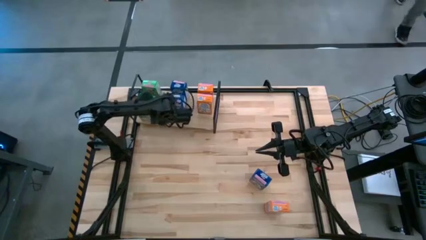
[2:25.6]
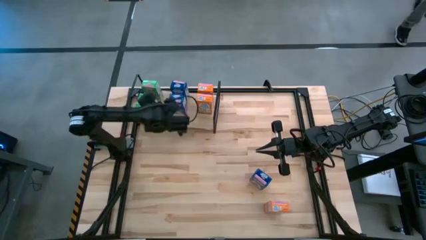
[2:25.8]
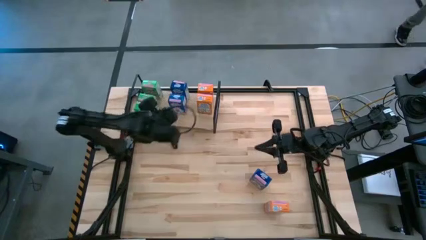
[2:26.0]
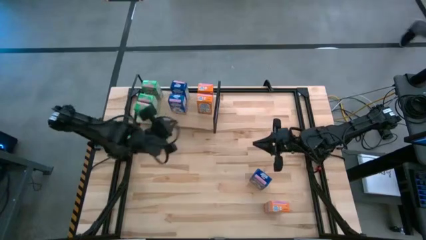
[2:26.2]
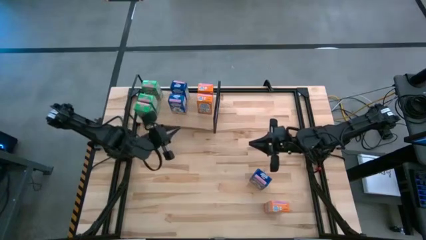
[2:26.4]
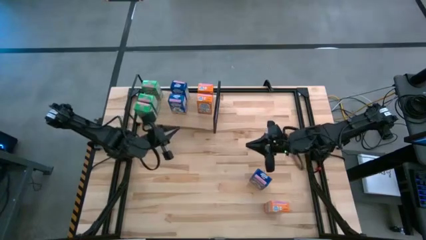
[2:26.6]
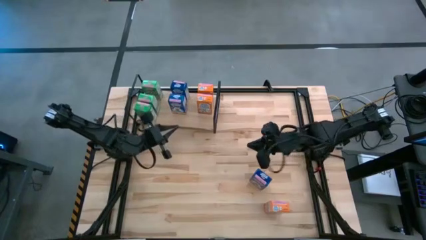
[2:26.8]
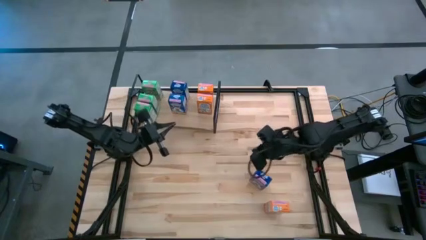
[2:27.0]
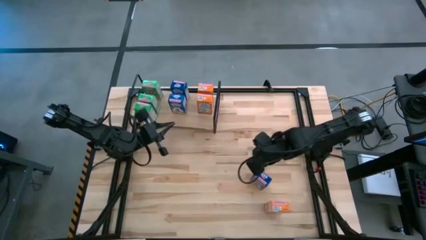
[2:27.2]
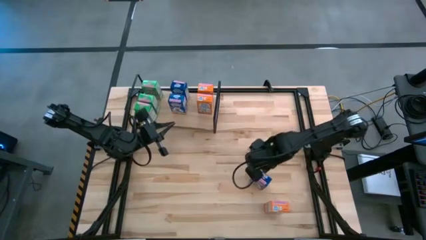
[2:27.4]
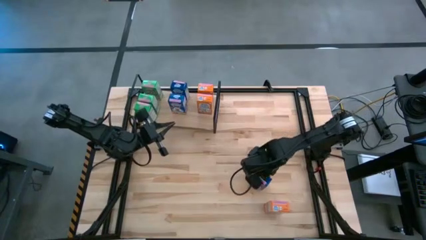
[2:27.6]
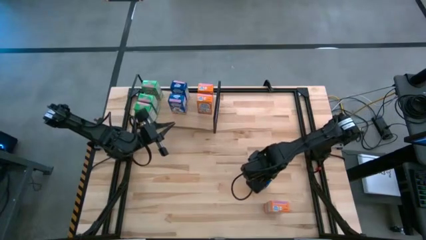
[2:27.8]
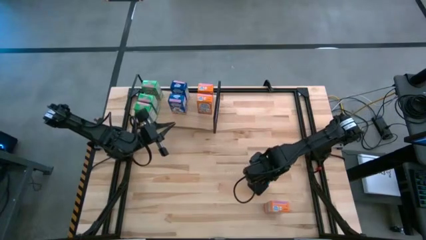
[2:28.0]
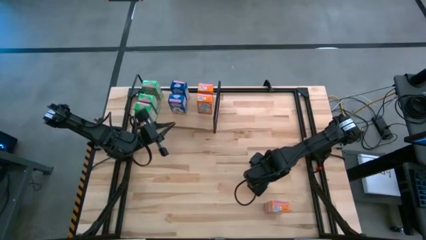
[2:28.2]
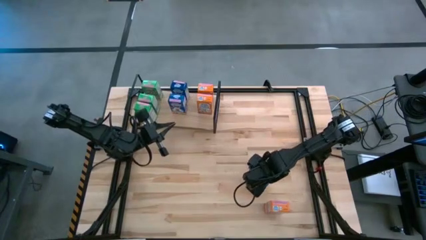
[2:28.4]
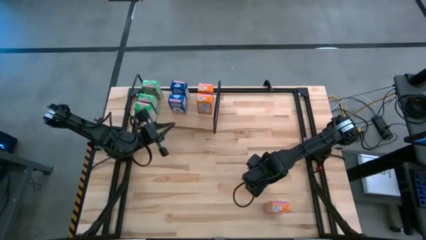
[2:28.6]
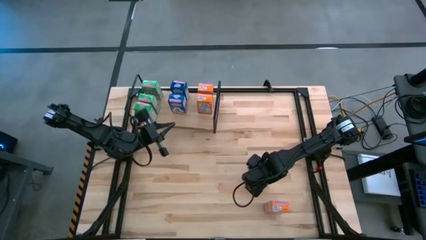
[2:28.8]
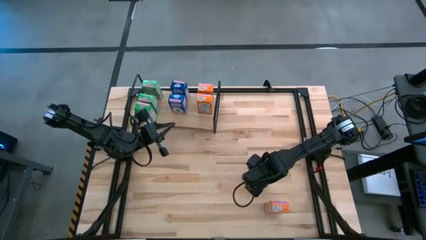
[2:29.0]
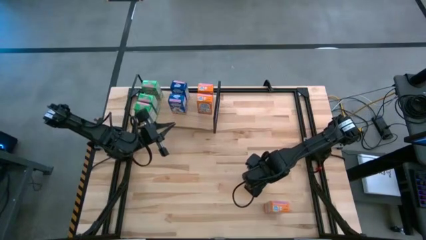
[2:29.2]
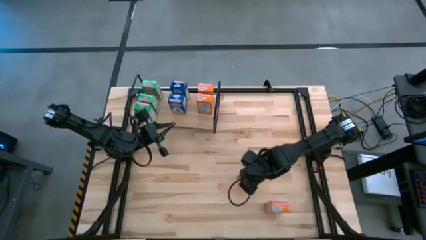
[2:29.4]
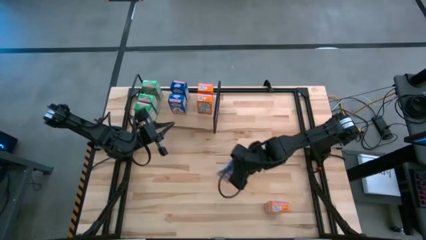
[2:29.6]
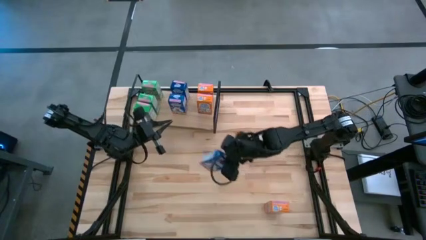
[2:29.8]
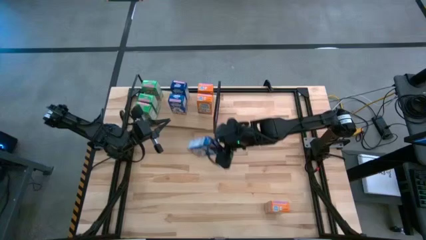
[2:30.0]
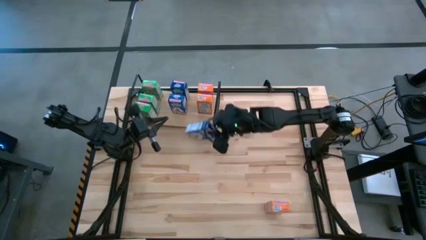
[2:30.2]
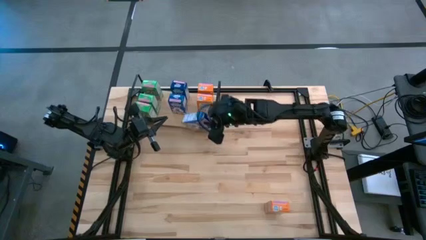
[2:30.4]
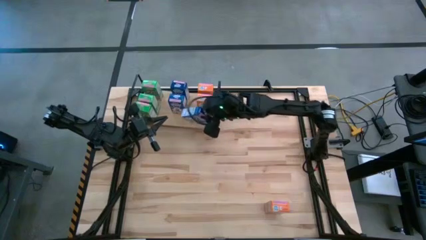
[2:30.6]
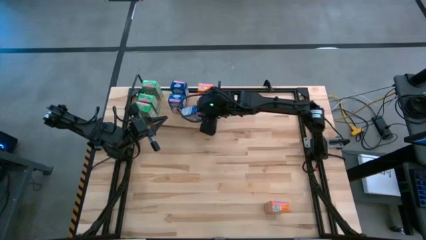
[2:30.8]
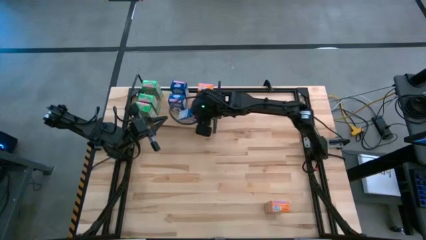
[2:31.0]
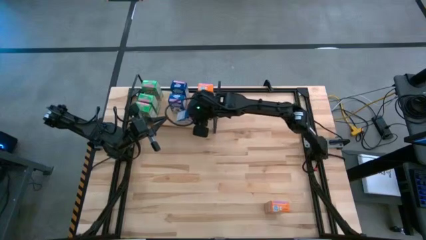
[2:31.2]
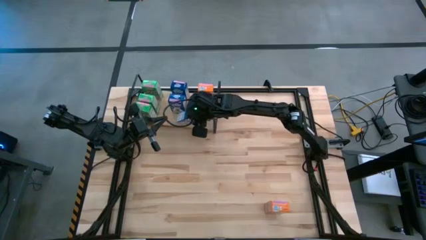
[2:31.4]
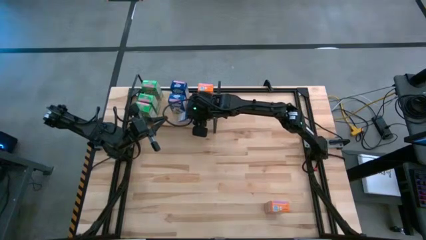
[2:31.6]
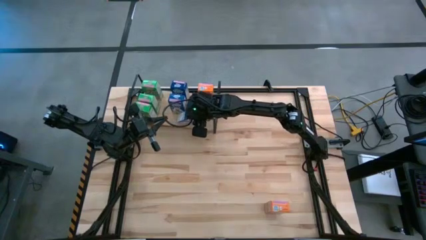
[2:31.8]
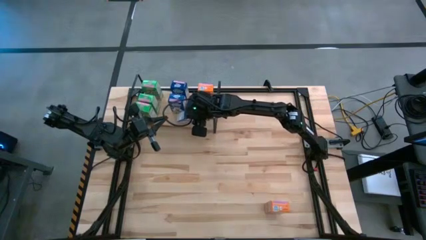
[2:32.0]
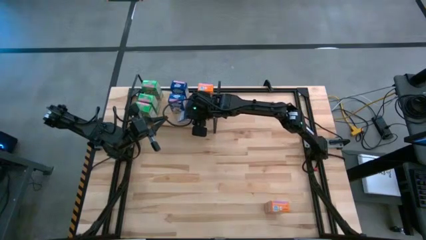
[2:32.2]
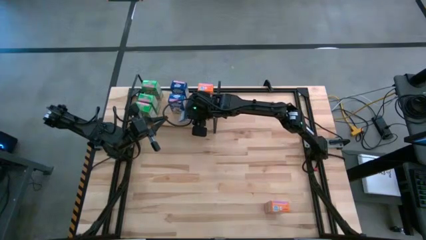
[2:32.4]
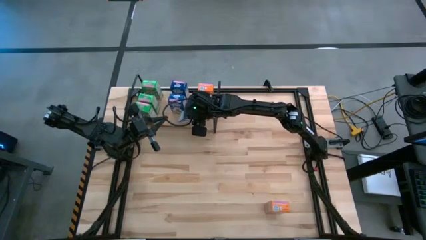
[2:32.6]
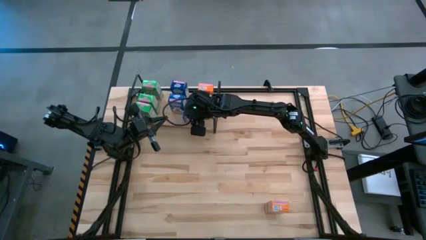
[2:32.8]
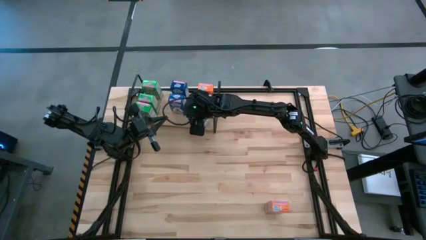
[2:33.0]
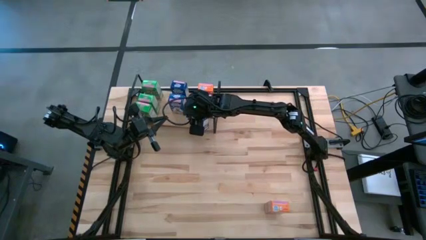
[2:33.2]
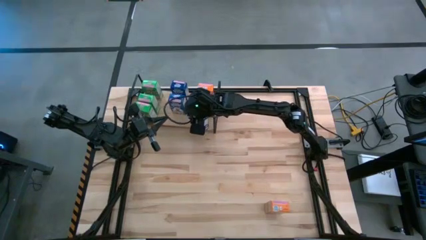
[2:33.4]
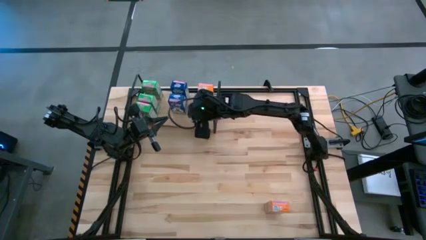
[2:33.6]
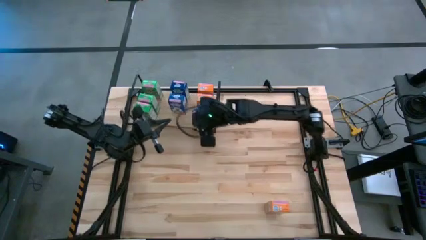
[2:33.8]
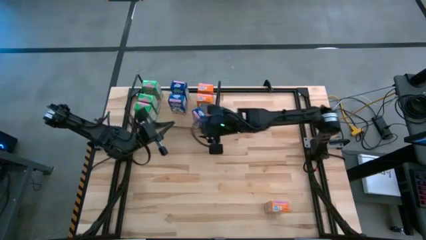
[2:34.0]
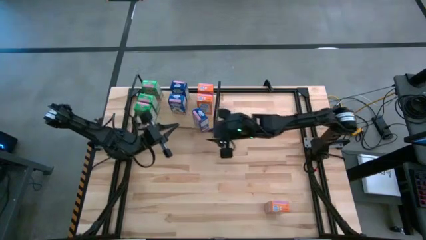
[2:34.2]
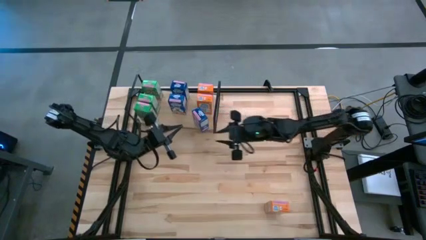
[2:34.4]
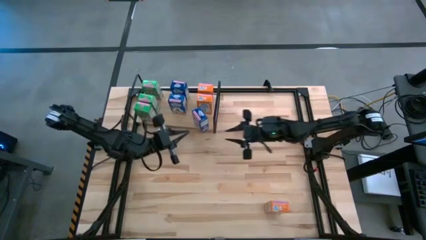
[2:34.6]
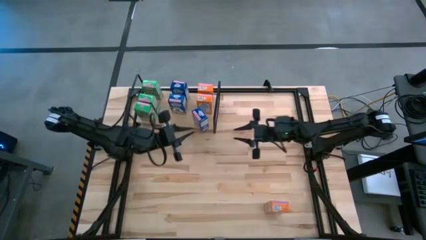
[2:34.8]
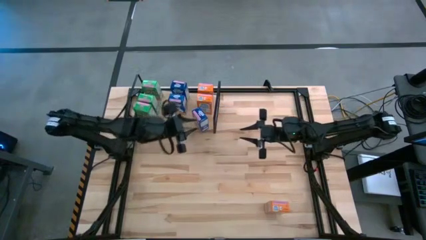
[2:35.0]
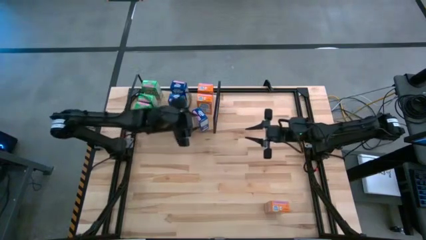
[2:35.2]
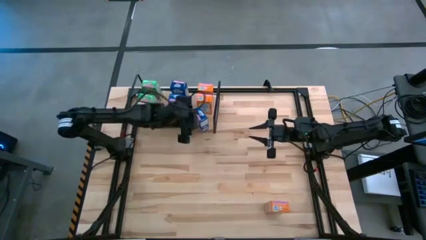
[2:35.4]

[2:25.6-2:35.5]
Task: Stack cereal on shelf
Put the blue cereal box on the shelf aligned with the blue cereal boxes
